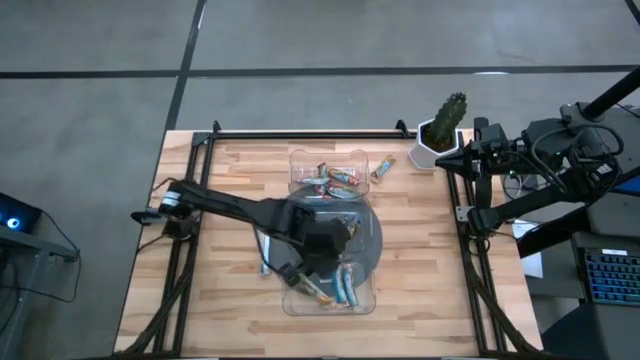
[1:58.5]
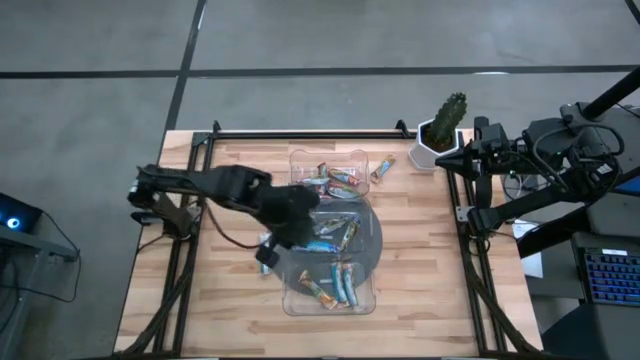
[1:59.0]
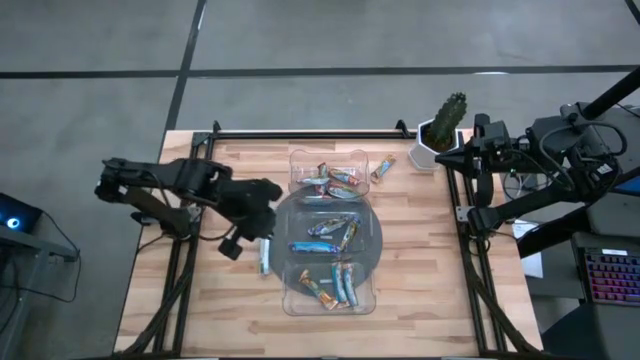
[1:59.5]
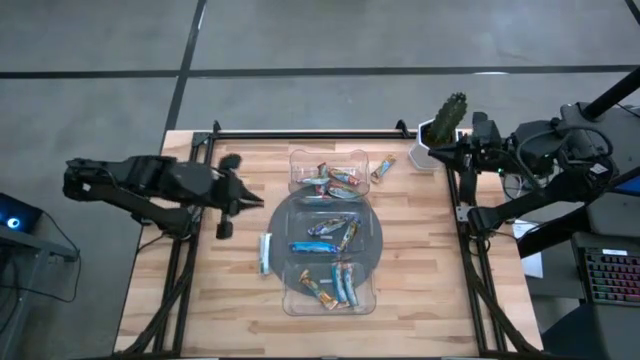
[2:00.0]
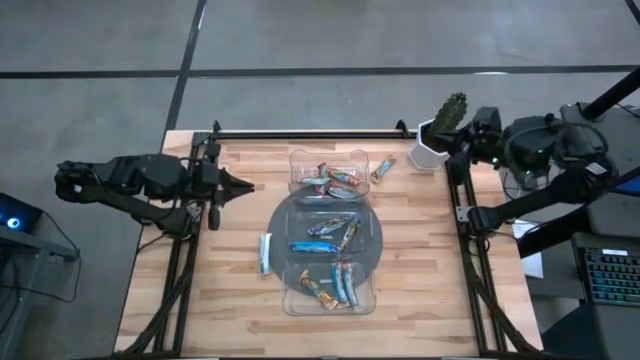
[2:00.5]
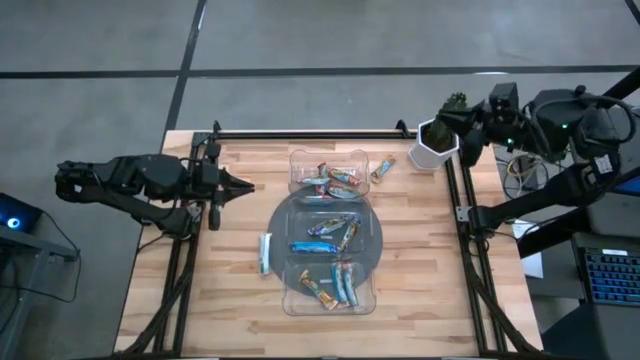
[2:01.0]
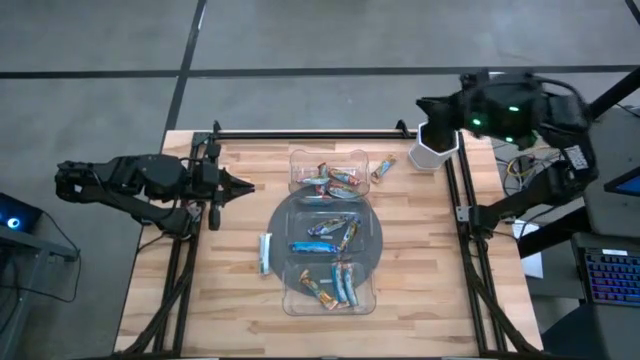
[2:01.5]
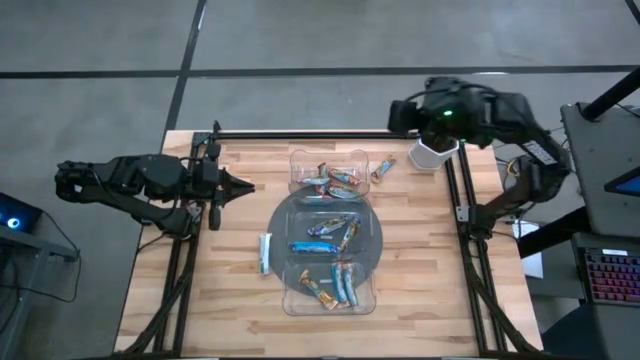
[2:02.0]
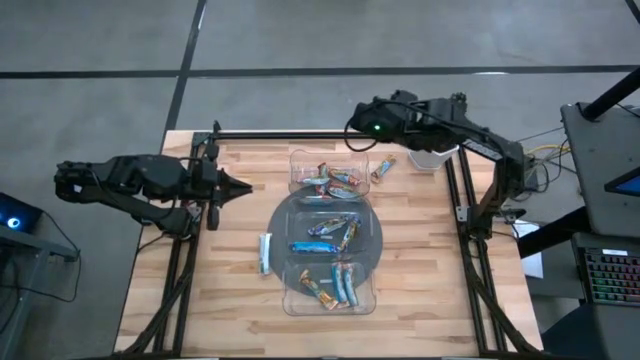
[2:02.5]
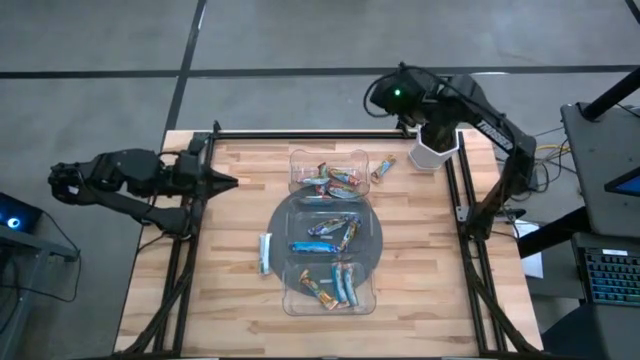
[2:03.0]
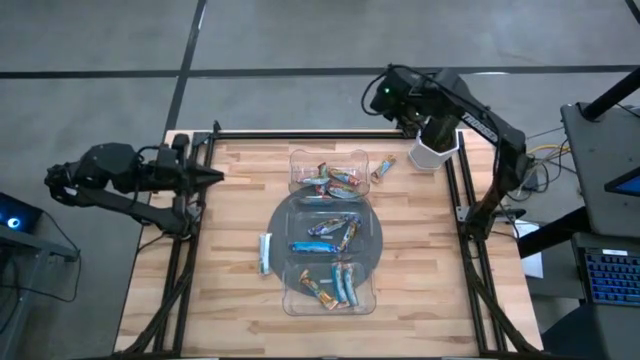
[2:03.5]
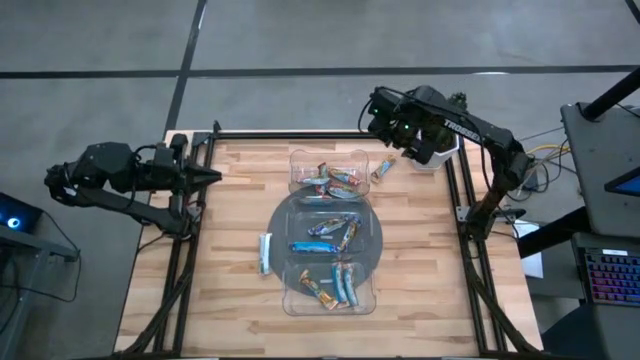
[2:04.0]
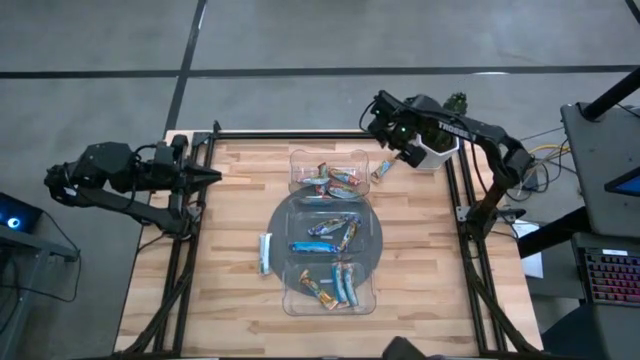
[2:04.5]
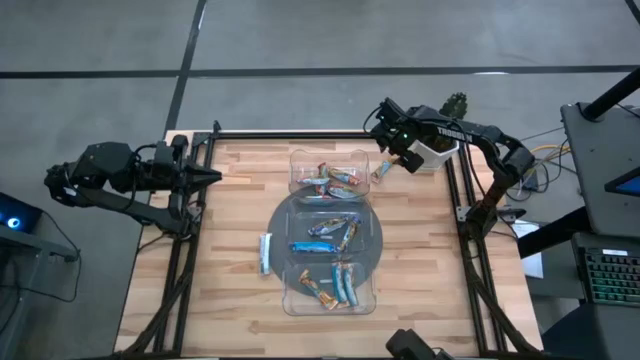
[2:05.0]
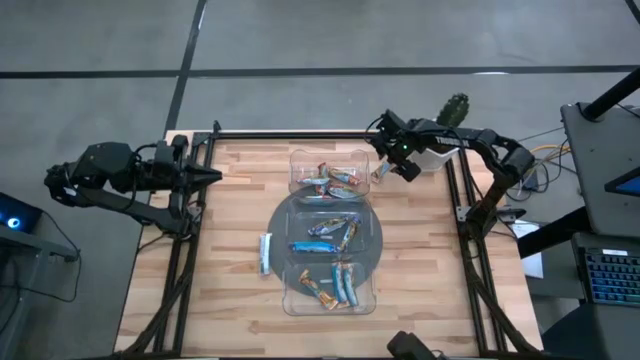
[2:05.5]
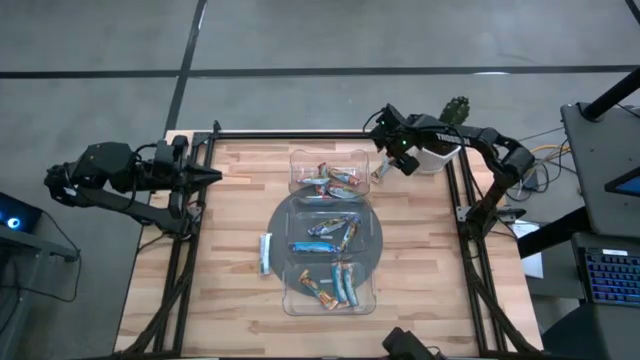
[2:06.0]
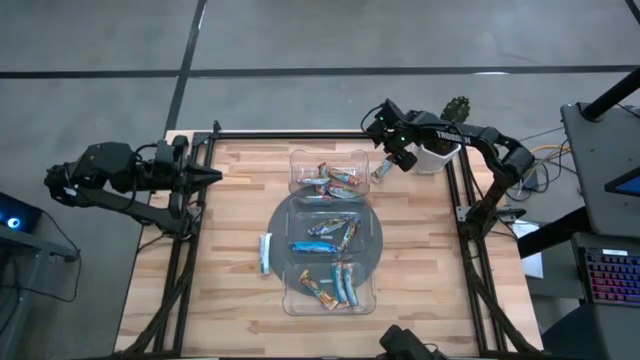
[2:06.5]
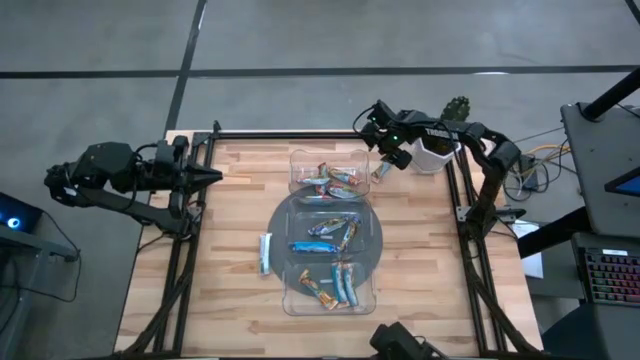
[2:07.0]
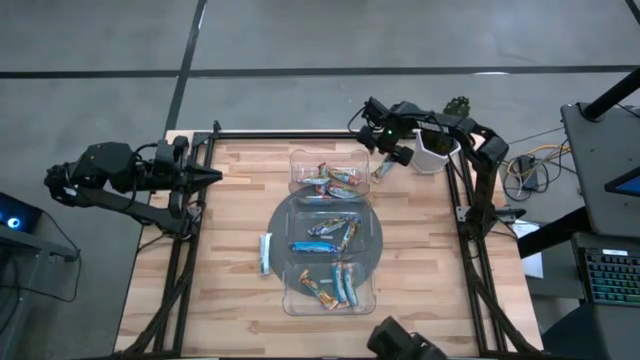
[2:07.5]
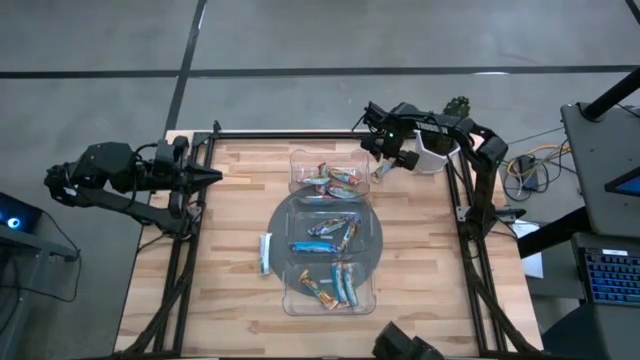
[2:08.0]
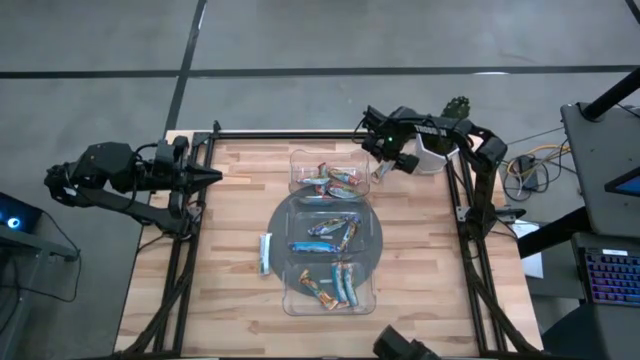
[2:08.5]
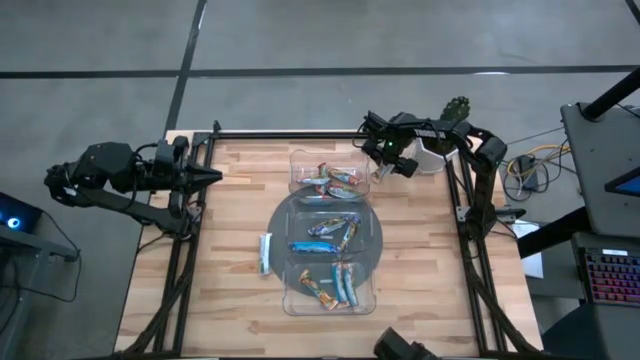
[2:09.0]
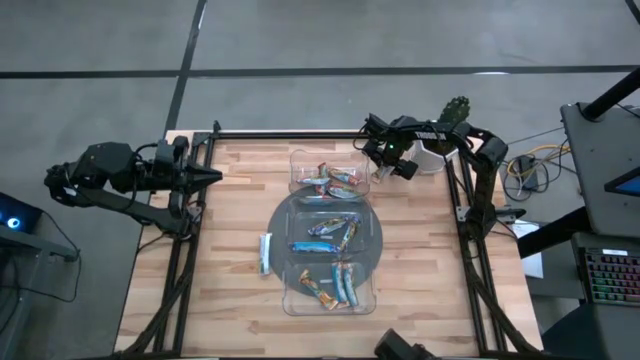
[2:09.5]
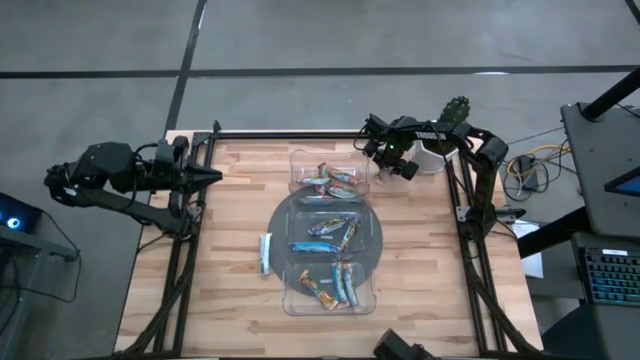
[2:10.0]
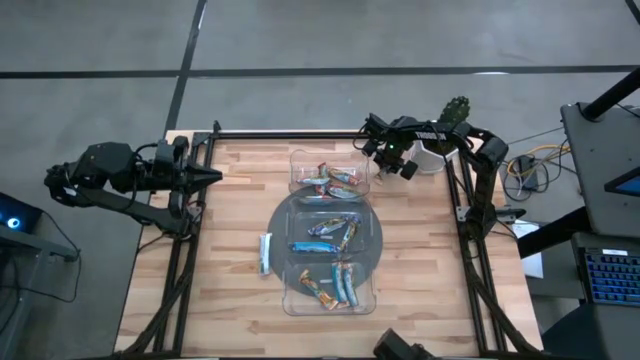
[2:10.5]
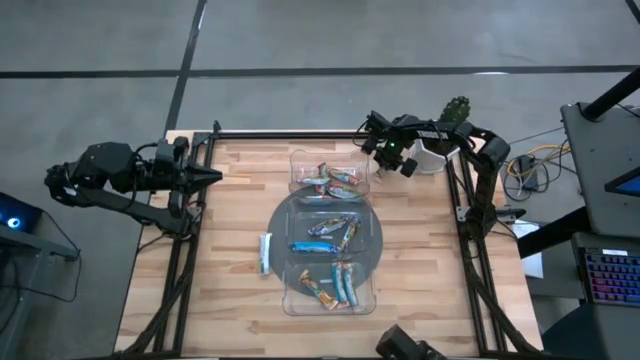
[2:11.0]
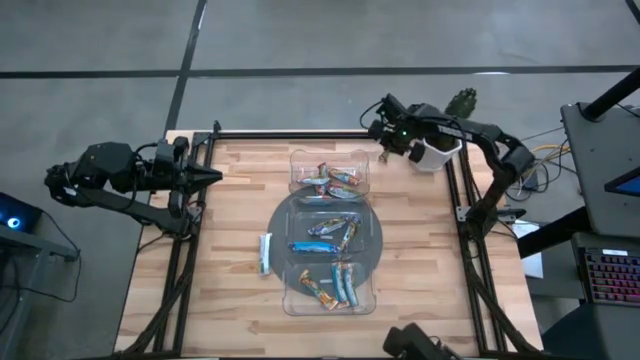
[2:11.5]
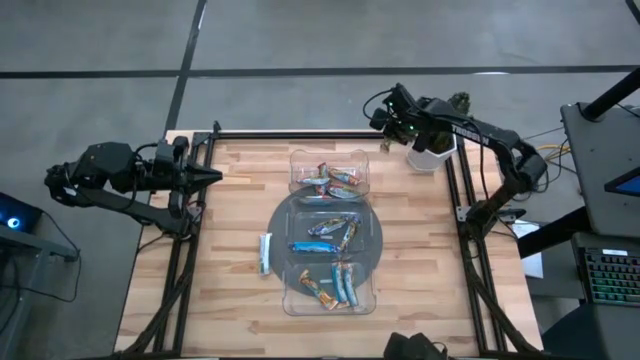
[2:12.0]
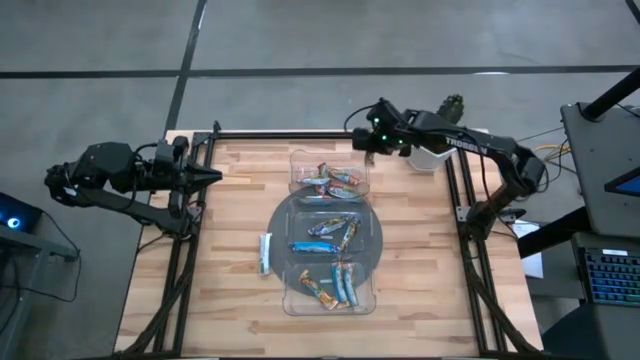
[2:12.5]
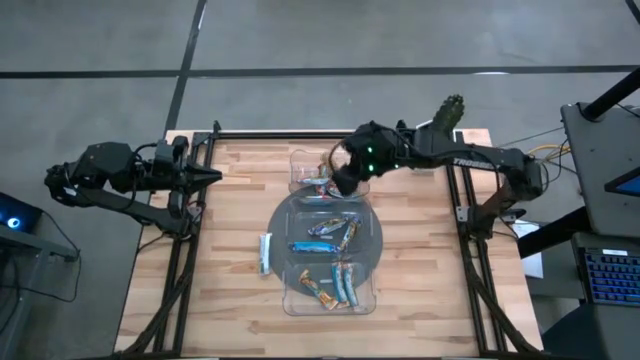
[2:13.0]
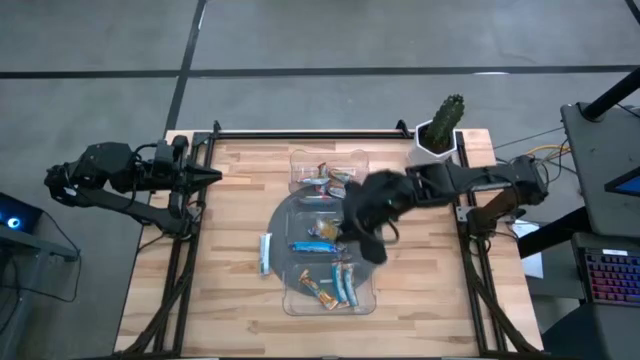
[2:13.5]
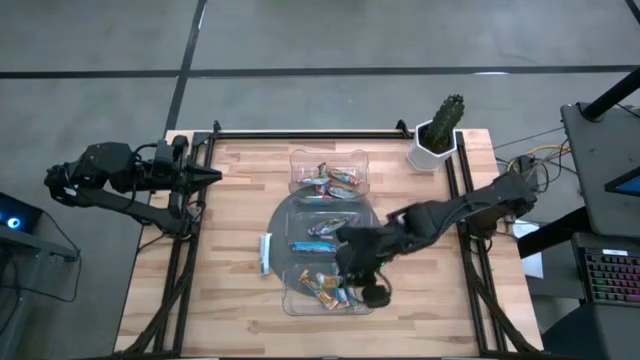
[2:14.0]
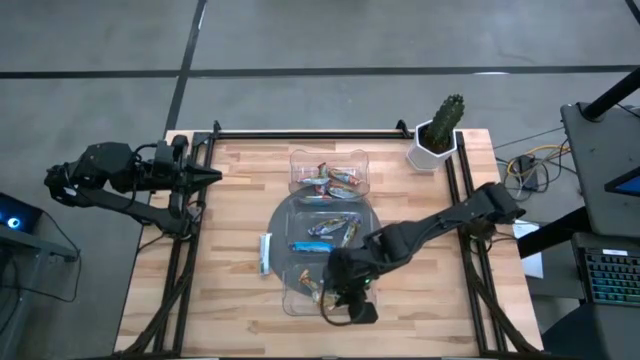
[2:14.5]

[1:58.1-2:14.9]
Task: Pick and place Granola Bars by type
Put the yellow granola bar into the bottom transparent bin

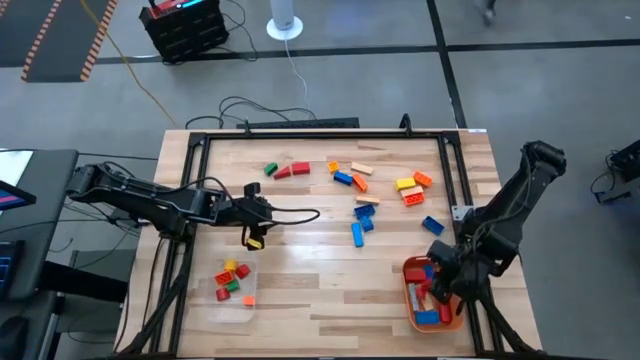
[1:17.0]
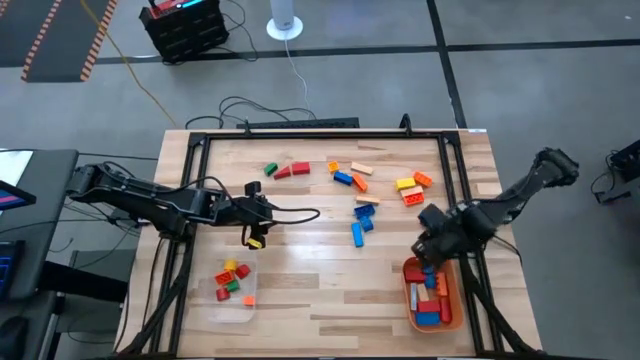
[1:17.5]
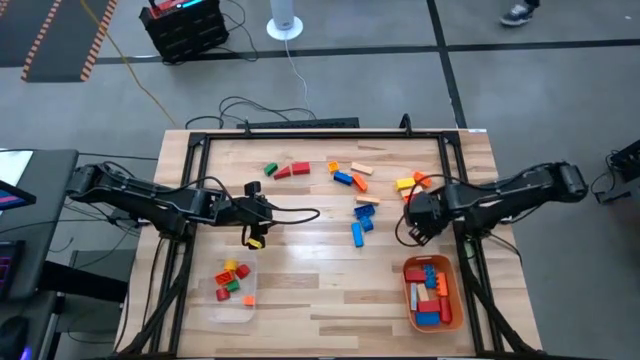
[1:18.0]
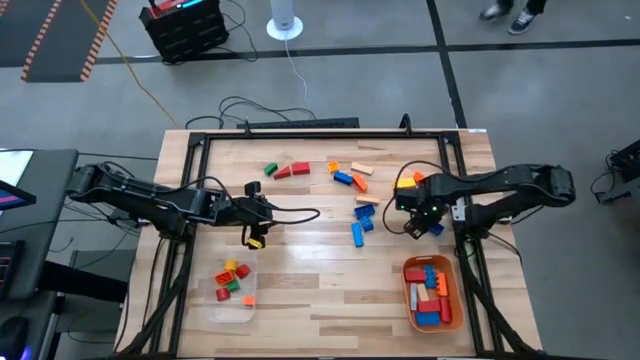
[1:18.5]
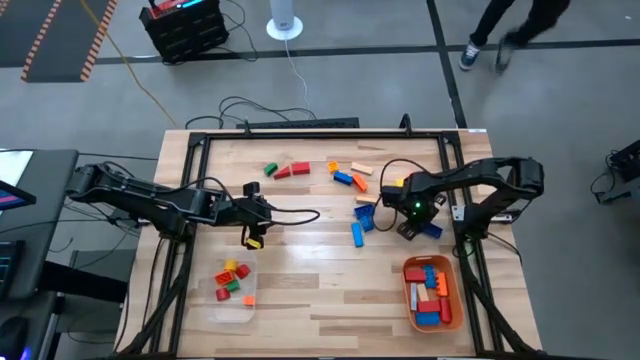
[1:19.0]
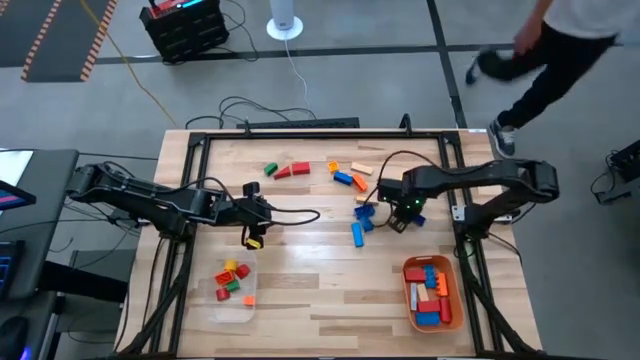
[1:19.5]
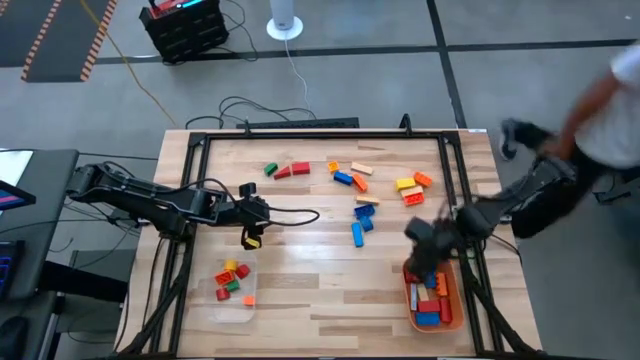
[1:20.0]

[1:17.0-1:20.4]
Task: Sort blocks by size
Put the large blue game piece into the orange bin

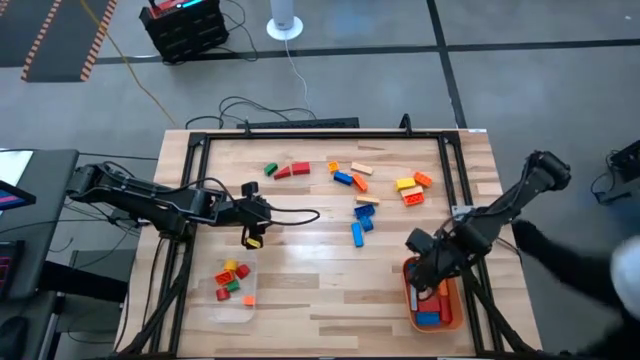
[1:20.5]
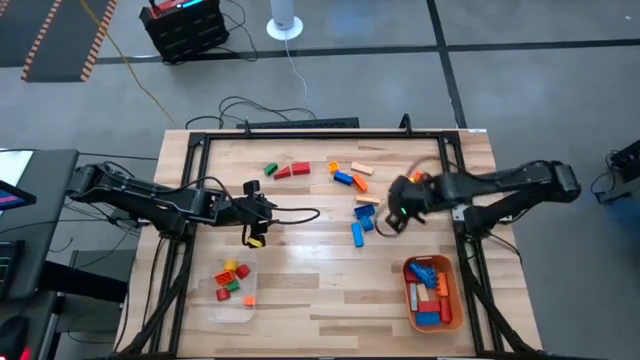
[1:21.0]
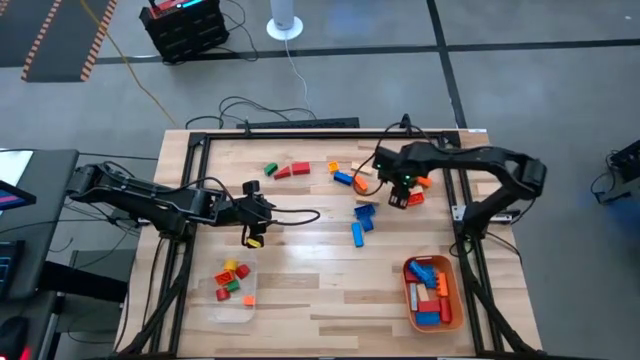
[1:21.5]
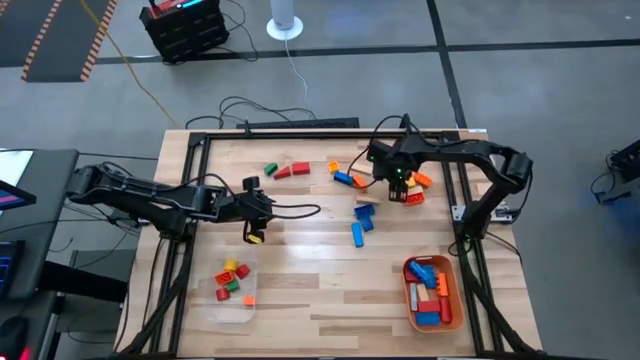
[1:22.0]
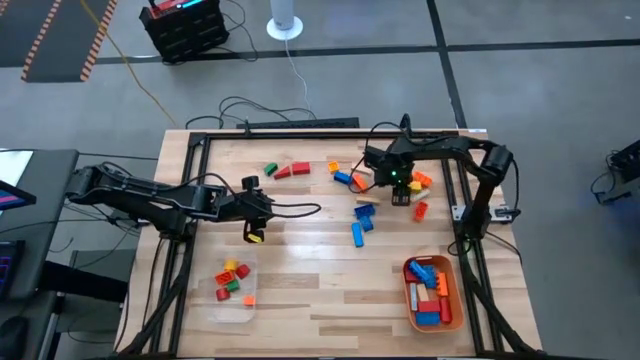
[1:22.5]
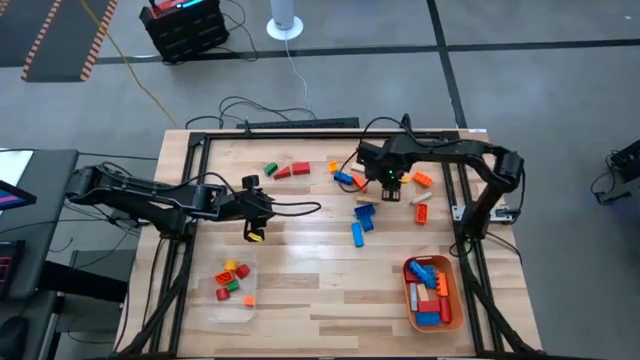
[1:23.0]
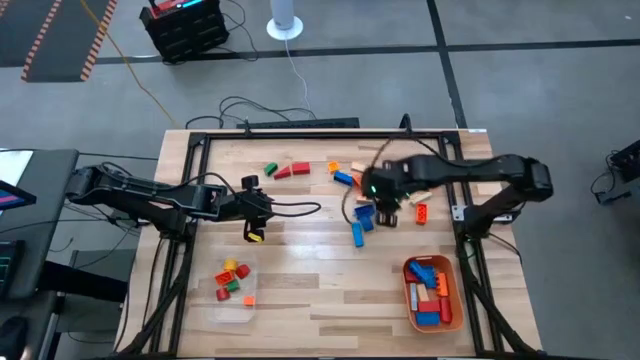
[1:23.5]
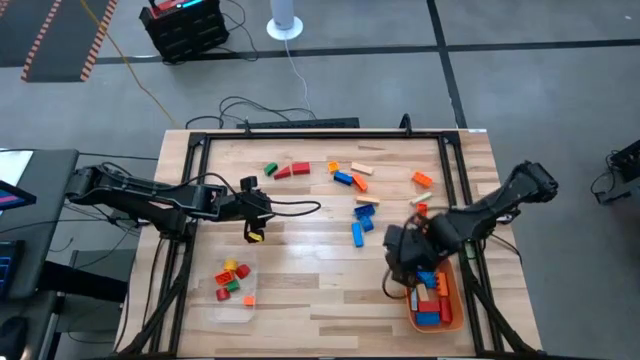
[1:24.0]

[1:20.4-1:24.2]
Put the large yellow block into the orange bin
